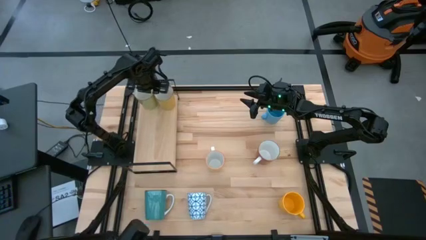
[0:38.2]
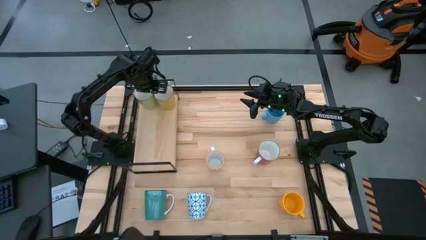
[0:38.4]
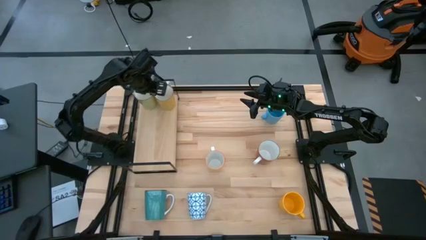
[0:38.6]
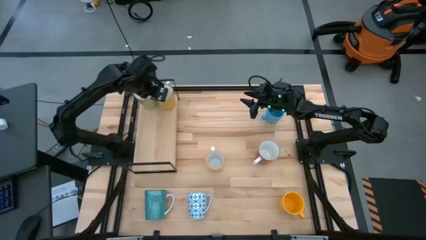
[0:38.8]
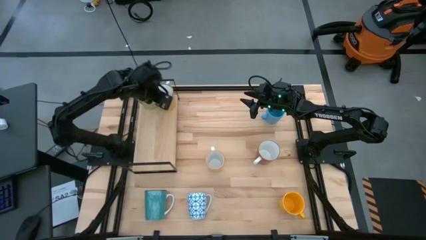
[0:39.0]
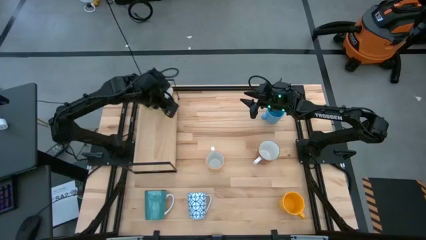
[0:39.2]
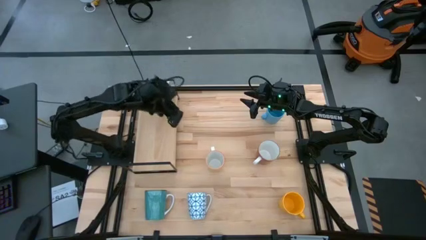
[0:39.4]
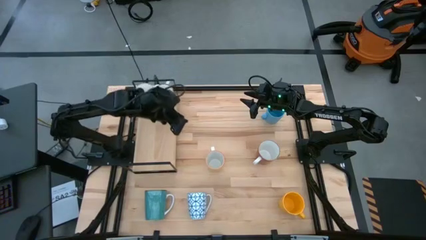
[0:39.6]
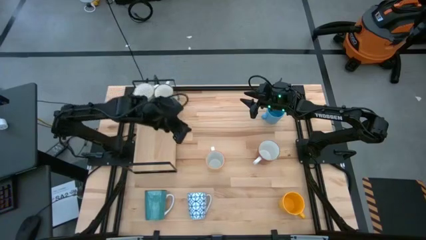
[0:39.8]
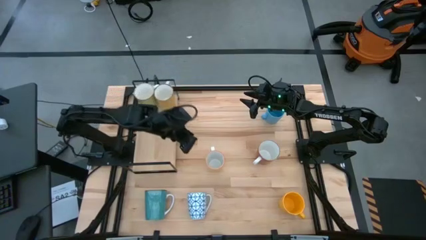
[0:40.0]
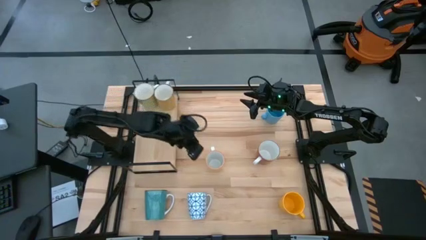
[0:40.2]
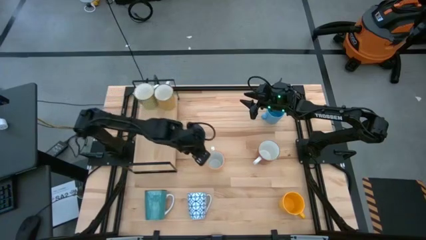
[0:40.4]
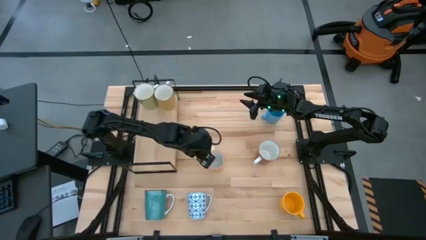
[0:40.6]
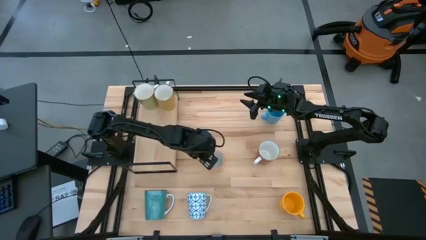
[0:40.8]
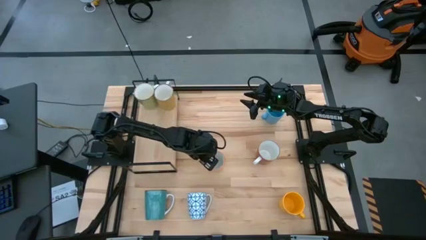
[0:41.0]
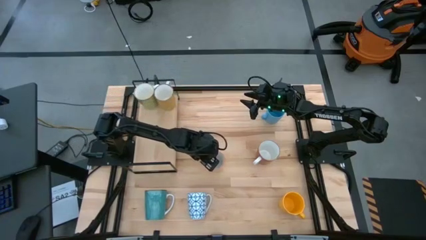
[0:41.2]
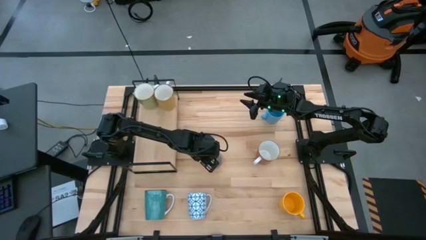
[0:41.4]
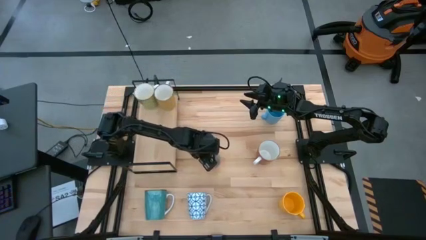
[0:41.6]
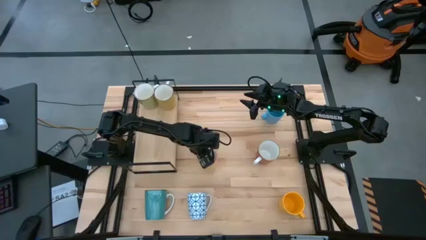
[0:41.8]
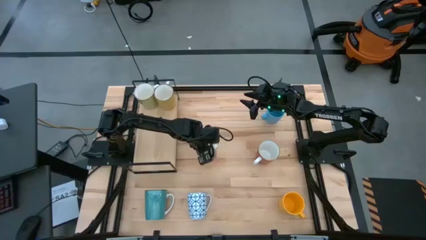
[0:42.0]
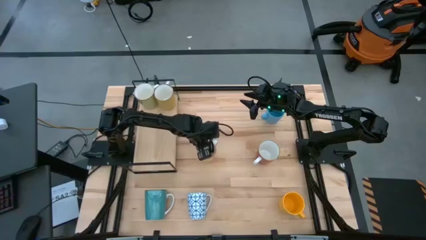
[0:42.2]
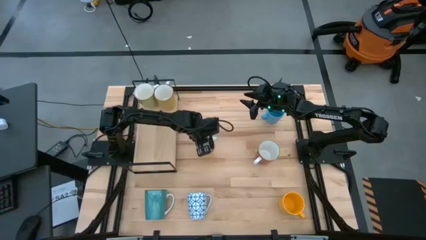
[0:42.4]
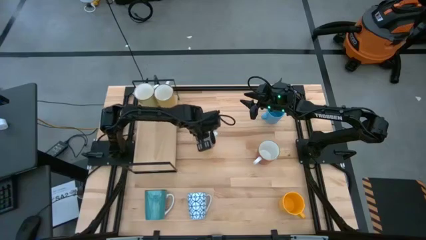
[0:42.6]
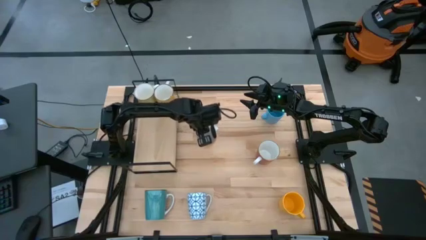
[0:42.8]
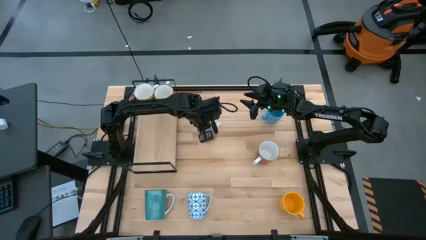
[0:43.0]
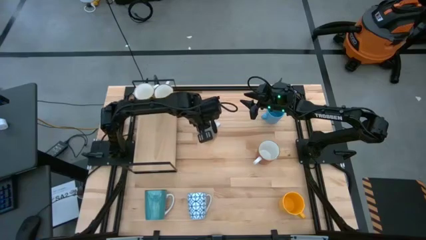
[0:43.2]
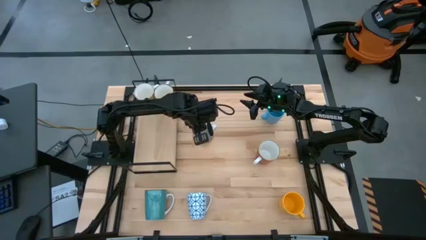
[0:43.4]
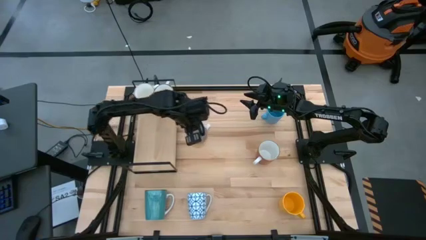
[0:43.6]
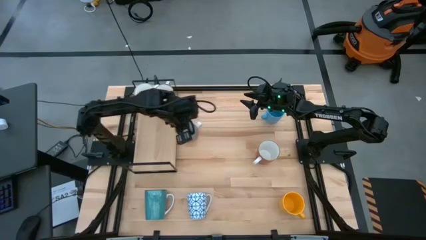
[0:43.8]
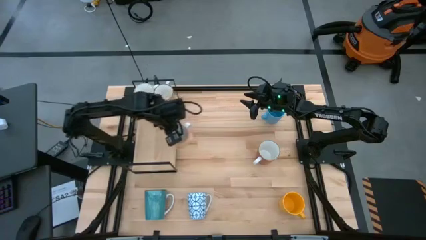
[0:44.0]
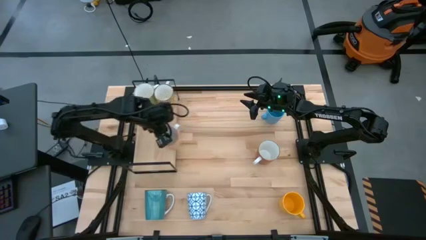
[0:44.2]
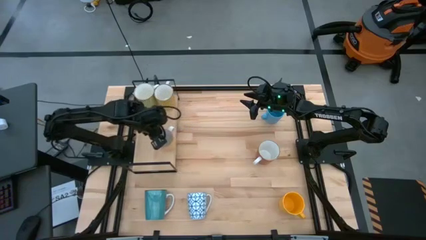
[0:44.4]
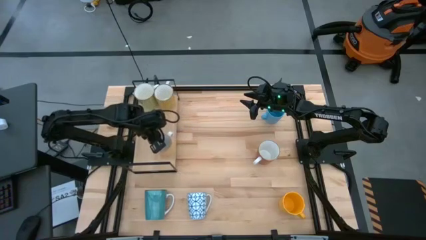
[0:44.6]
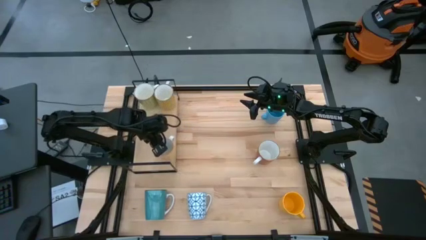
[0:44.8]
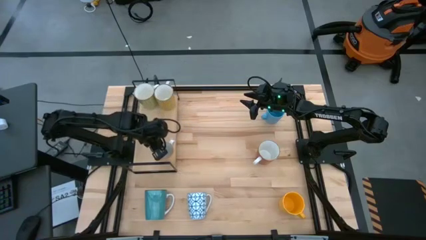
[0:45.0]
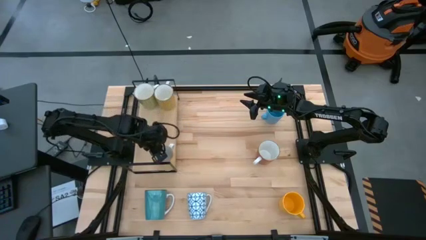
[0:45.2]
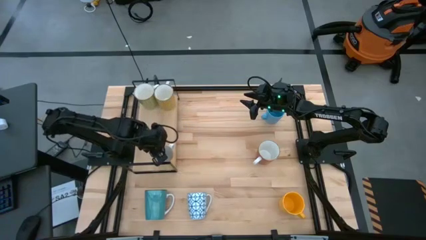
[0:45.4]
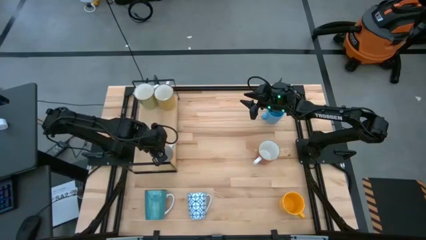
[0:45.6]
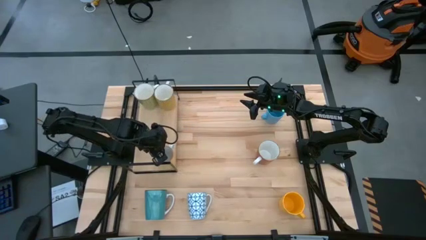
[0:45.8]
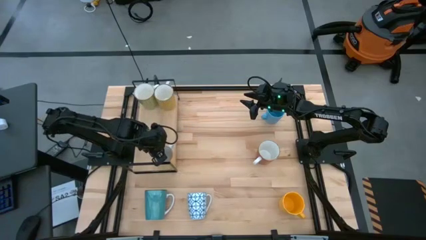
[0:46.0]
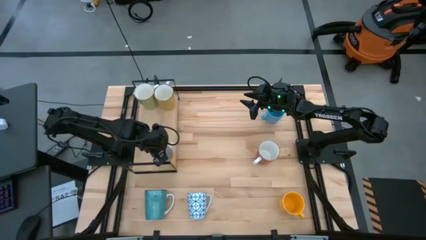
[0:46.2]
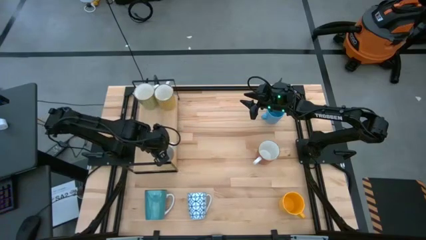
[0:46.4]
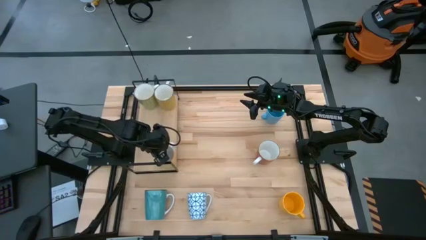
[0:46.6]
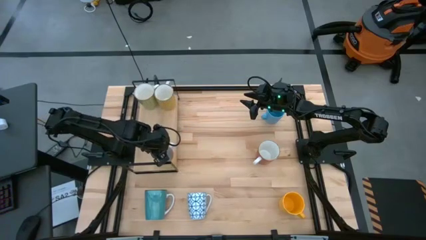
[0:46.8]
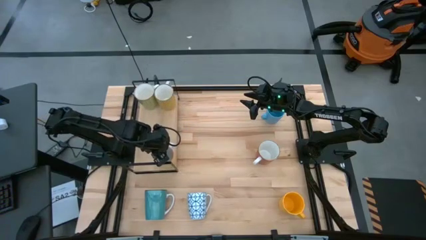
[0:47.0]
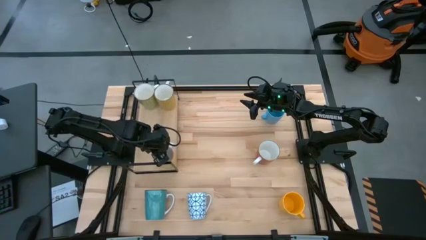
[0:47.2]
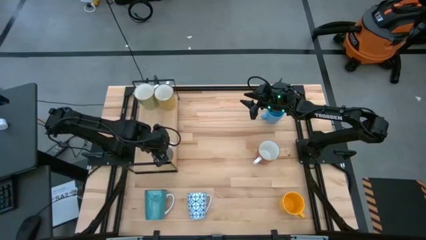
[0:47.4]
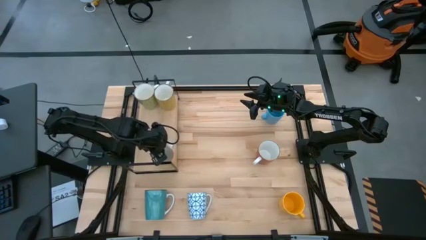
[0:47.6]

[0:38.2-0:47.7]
Task: Place coffee mugs
Put the yellow patterned mug on the shelf

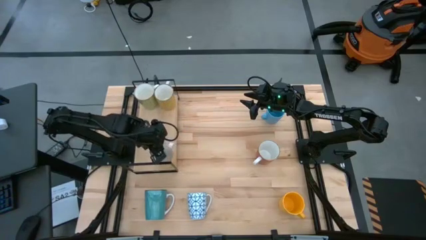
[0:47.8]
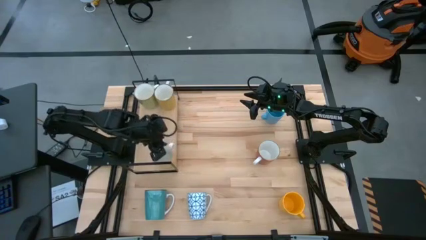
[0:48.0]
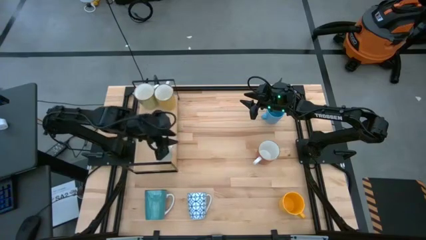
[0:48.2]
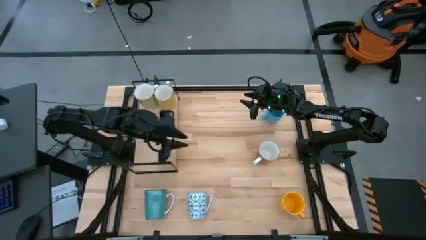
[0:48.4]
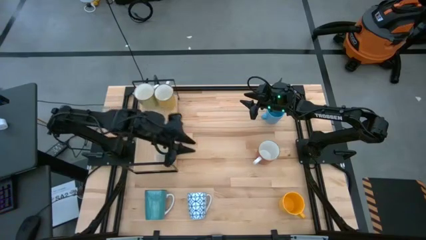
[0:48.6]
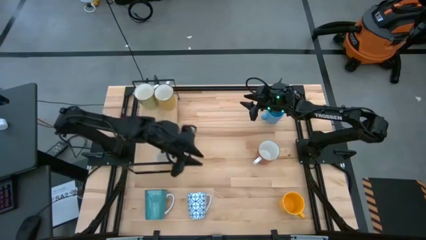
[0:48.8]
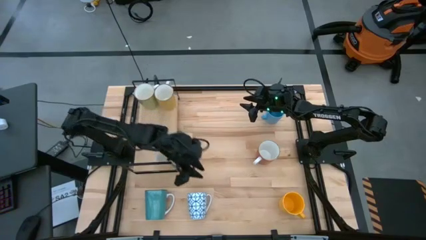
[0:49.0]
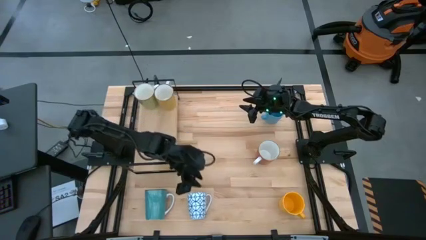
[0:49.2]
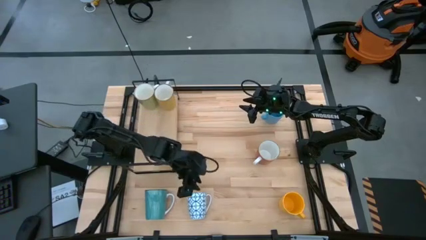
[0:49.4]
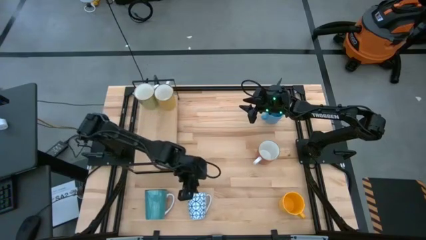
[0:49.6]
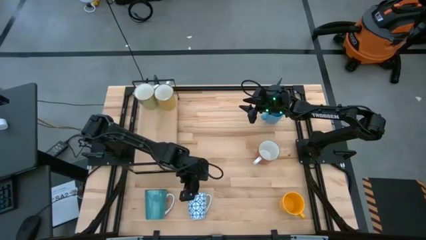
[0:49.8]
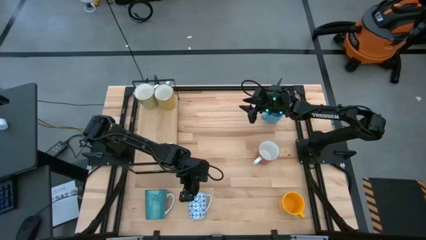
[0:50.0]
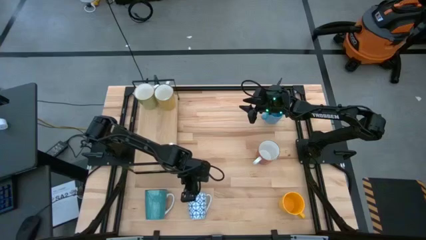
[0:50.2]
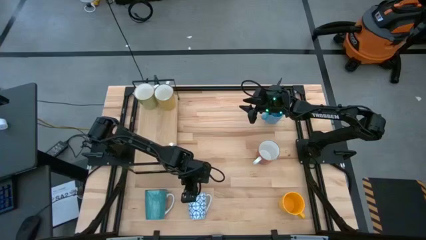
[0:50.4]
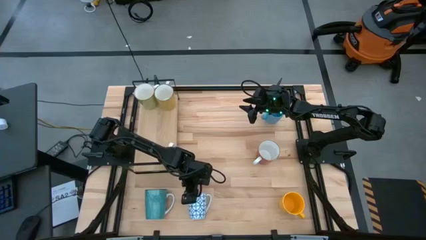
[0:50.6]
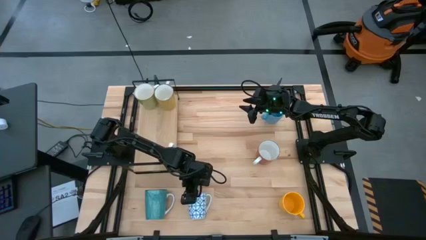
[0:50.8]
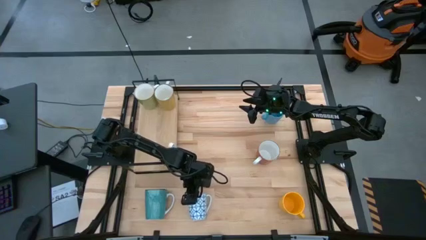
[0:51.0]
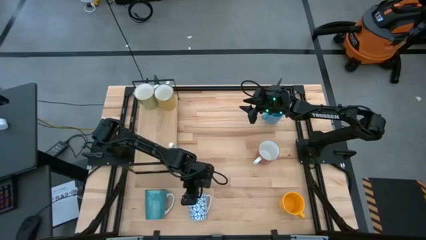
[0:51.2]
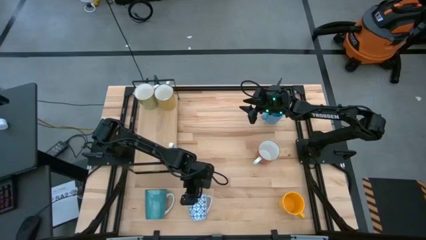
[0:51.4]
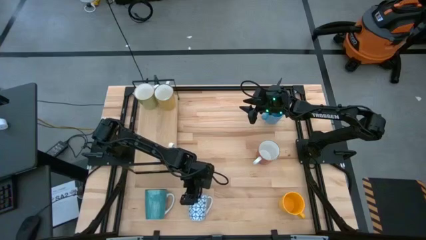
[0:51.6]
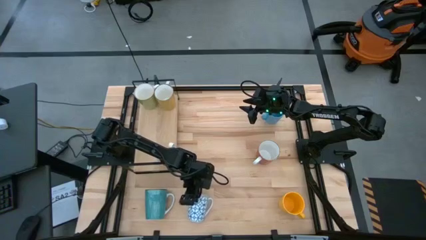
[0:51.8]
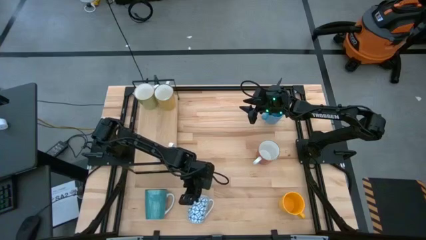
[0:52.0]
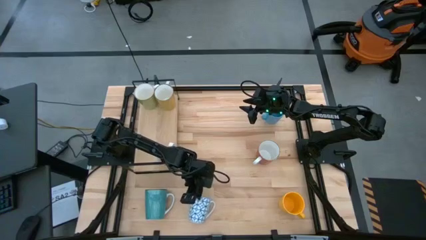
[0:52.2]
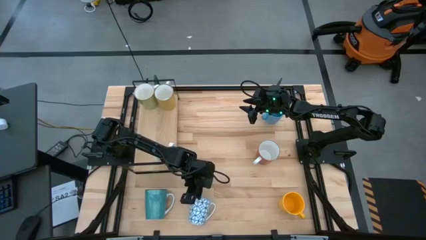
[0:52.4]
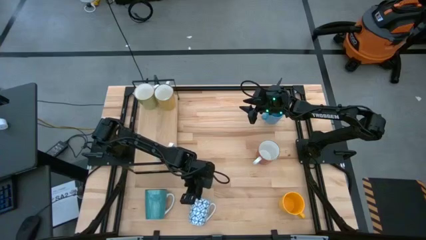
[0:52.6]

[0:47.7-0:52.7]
Move the blue patterned mug to the center of the table

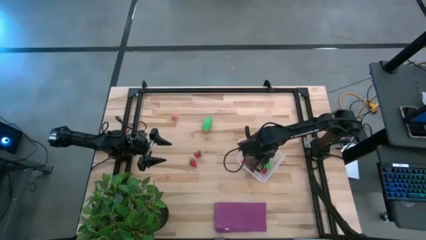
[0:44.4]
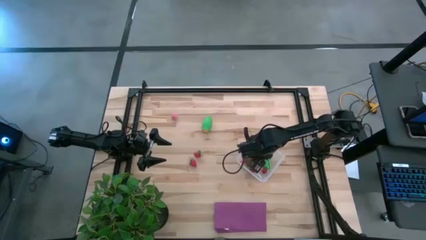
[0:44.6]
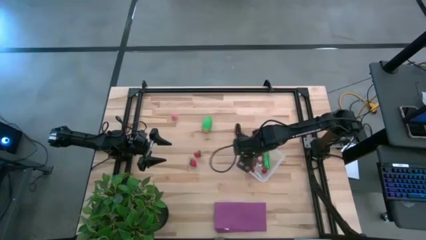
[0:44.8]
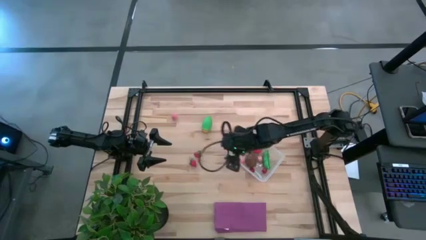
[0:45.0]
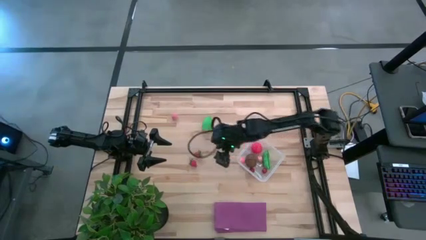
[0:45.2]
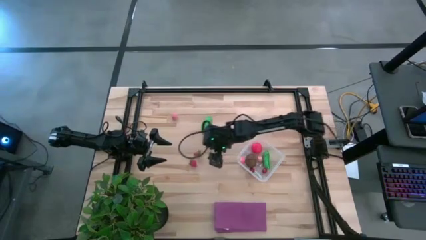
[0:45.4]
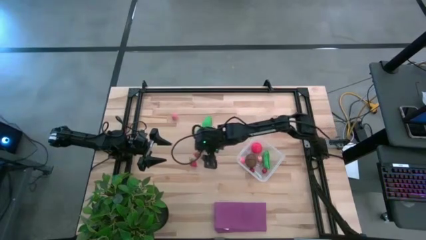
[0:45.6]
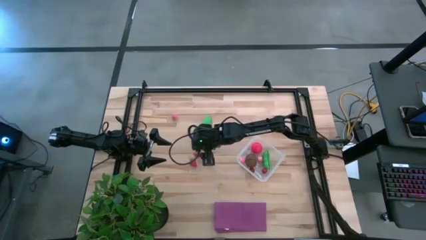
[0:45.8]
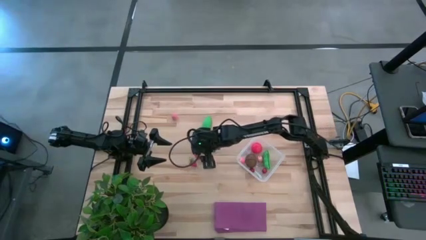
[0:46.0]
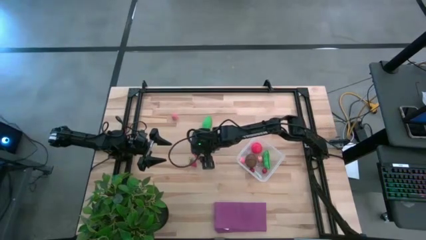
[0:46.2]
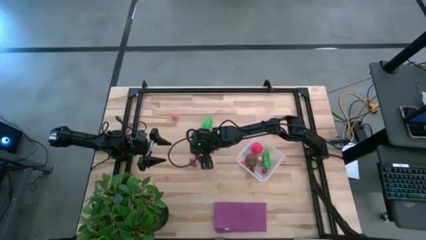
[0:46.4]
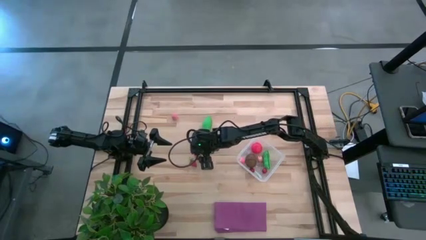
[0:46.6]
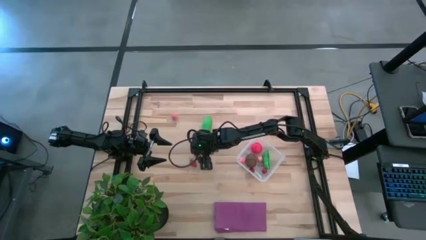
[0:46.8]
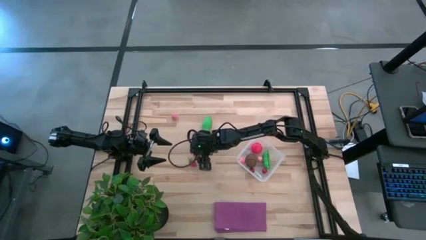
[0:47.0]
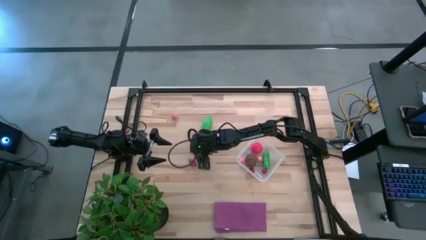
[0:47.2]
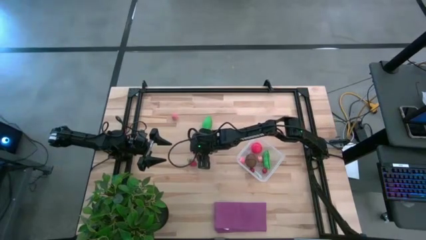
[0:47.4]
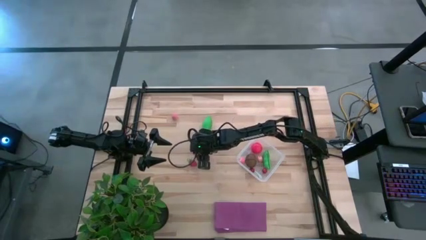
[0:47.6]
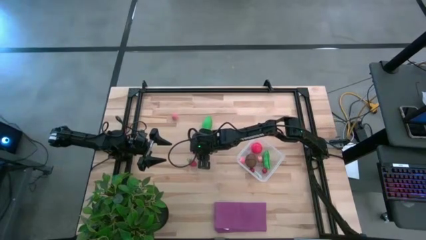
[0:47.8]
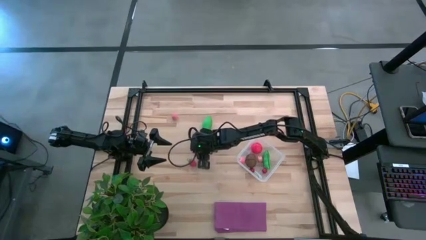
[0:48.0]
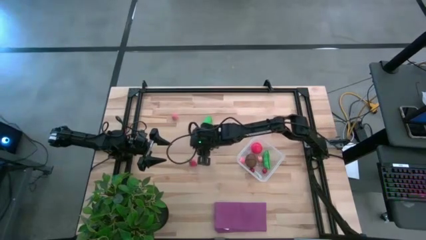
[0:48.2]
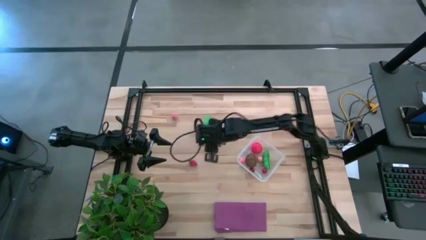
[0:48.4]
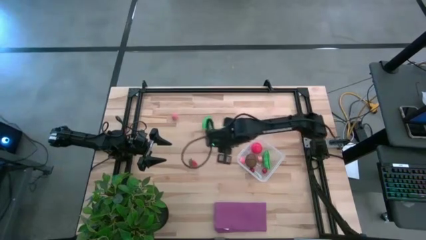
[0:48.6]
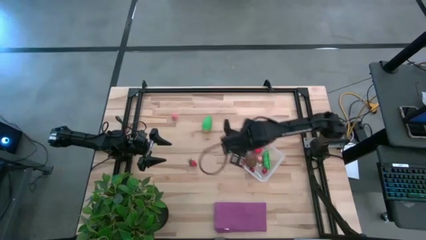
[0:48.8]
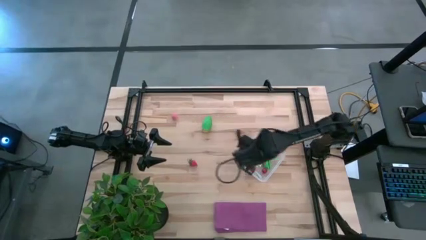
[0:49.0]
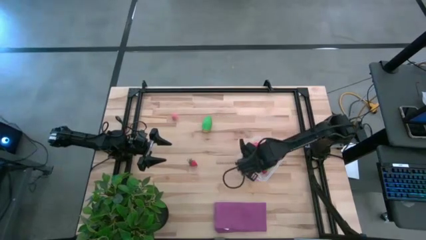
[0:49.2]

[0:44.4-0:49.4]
Task: Pick and placing Produce into tupperware
Put the top red strawberry into the transparent bin
